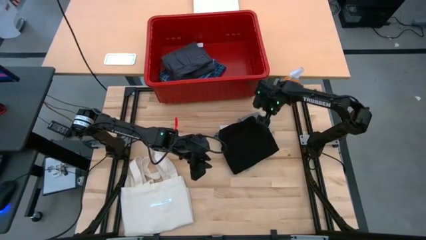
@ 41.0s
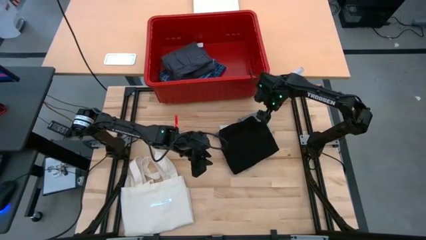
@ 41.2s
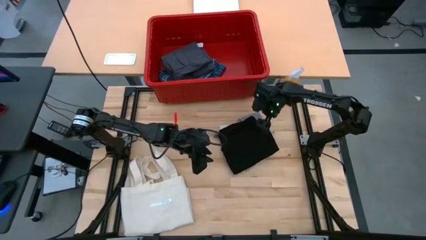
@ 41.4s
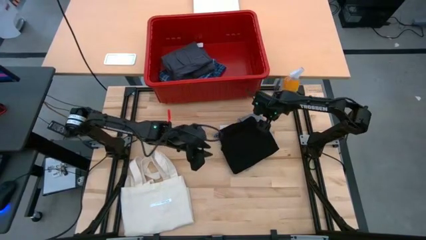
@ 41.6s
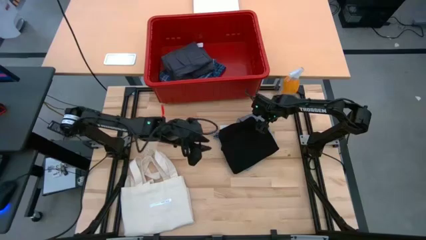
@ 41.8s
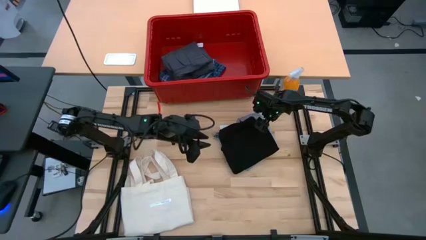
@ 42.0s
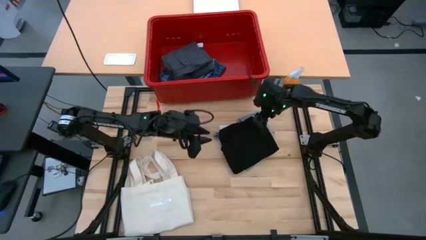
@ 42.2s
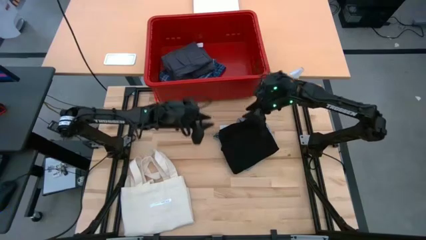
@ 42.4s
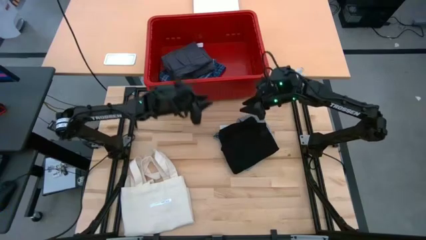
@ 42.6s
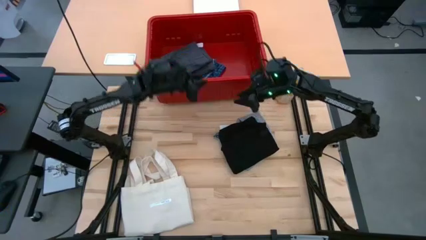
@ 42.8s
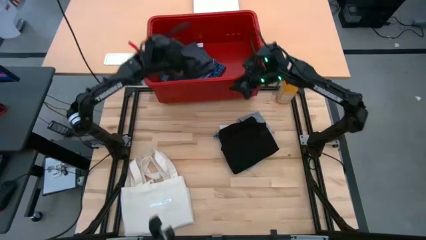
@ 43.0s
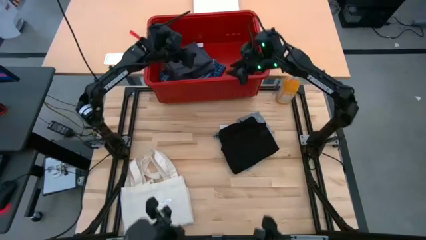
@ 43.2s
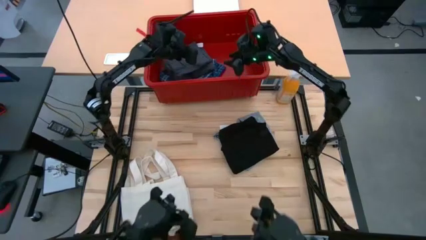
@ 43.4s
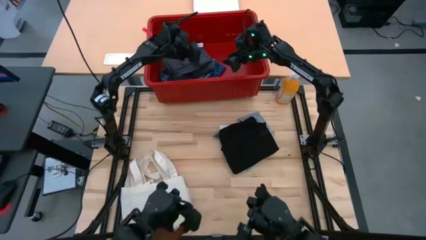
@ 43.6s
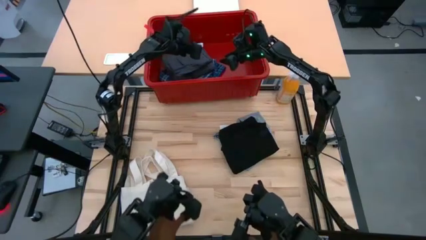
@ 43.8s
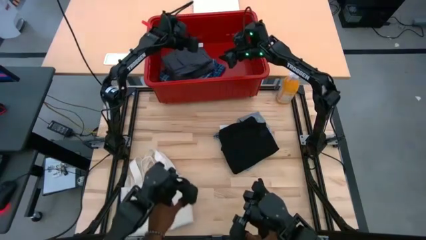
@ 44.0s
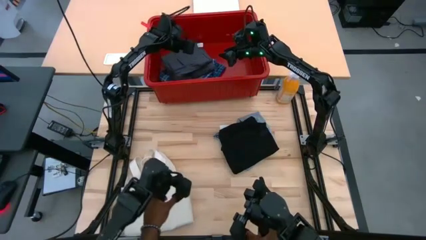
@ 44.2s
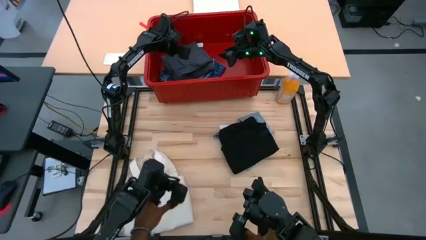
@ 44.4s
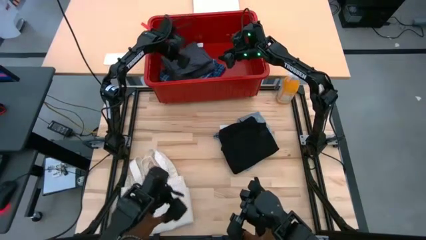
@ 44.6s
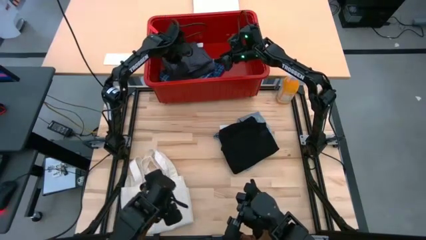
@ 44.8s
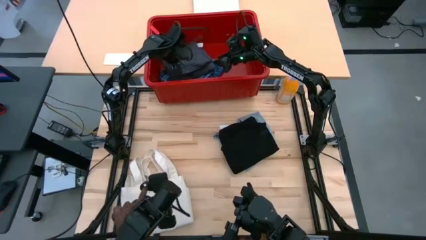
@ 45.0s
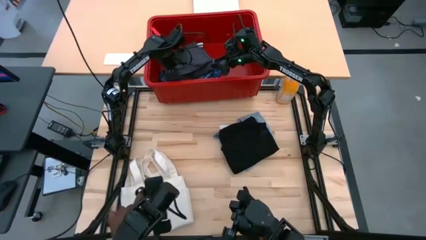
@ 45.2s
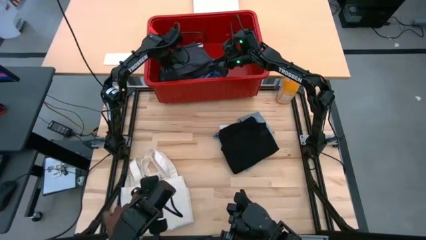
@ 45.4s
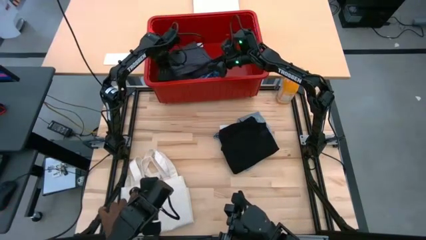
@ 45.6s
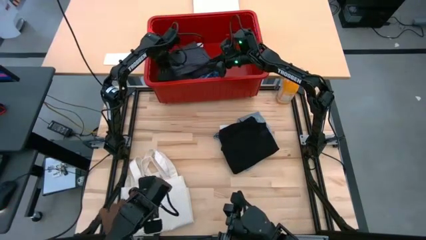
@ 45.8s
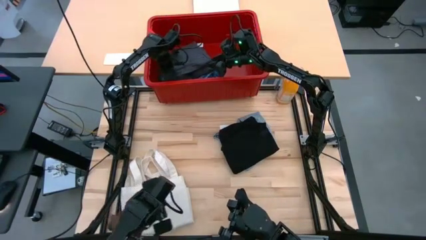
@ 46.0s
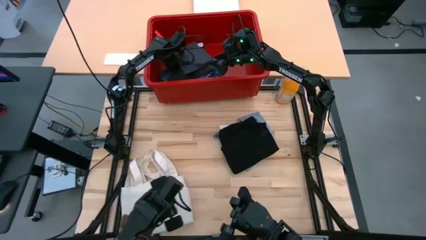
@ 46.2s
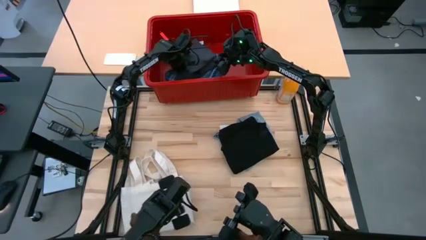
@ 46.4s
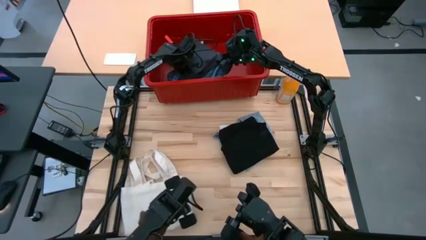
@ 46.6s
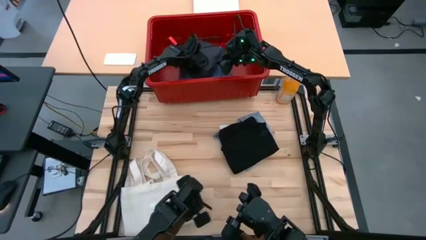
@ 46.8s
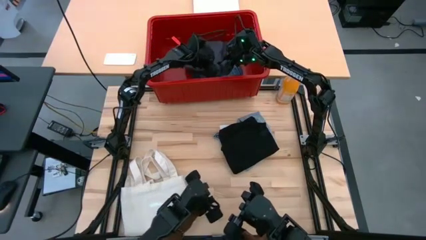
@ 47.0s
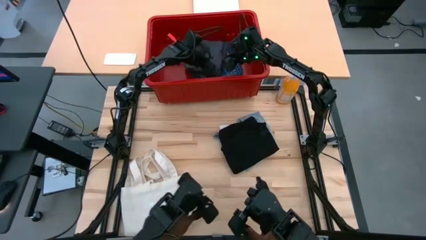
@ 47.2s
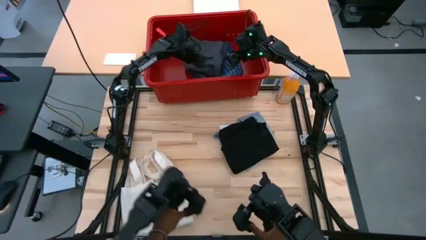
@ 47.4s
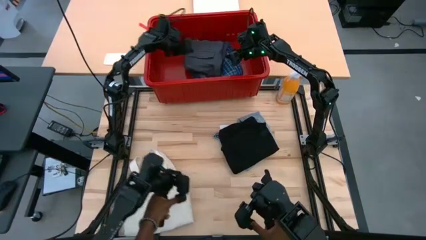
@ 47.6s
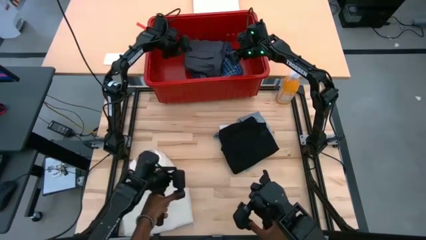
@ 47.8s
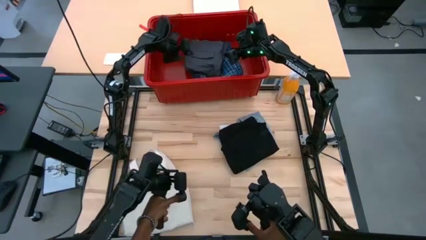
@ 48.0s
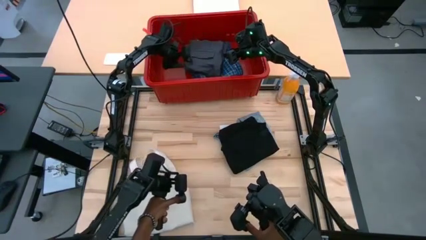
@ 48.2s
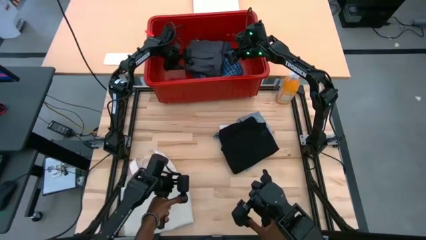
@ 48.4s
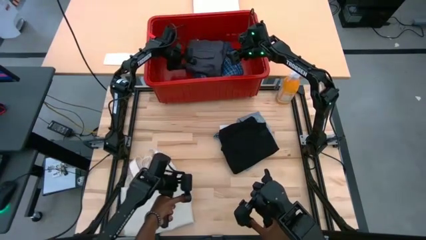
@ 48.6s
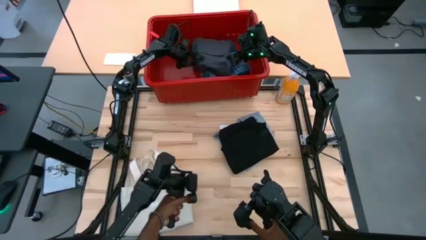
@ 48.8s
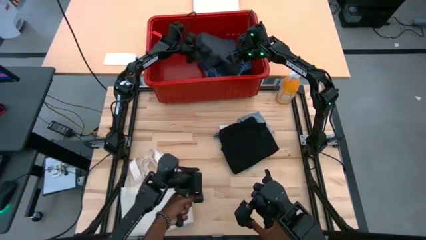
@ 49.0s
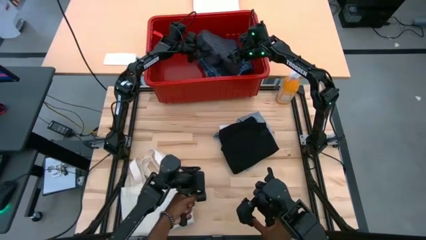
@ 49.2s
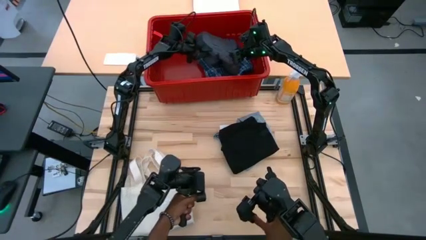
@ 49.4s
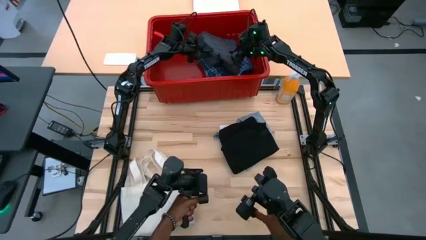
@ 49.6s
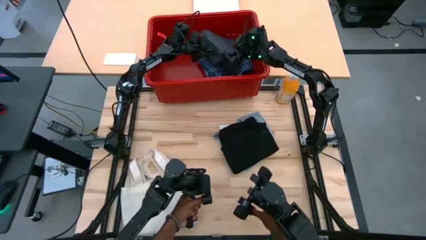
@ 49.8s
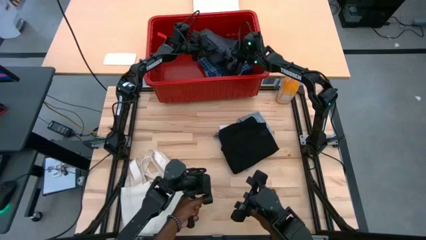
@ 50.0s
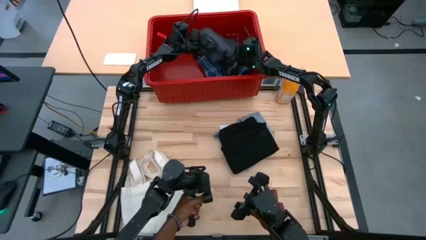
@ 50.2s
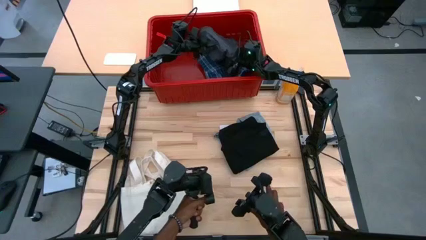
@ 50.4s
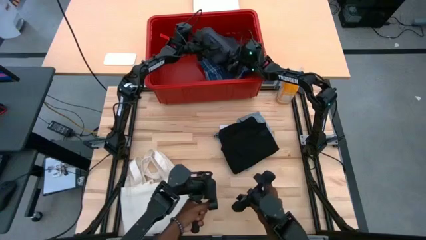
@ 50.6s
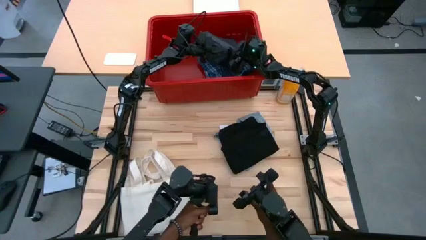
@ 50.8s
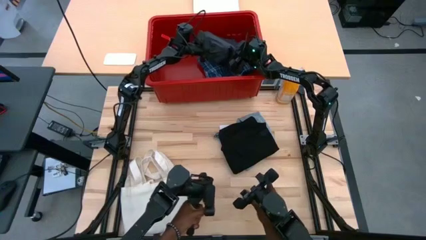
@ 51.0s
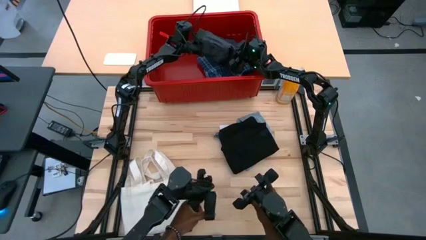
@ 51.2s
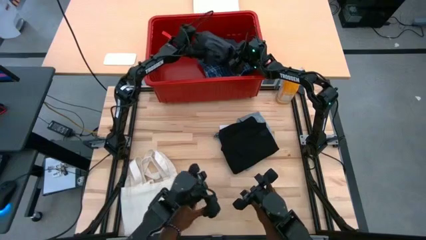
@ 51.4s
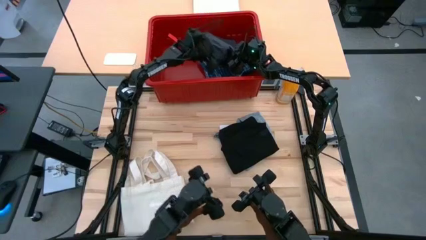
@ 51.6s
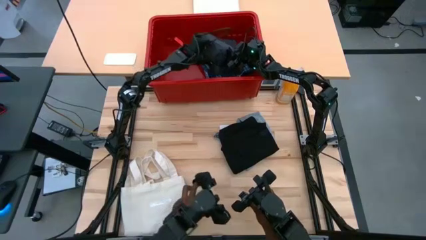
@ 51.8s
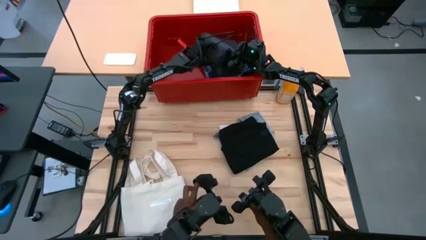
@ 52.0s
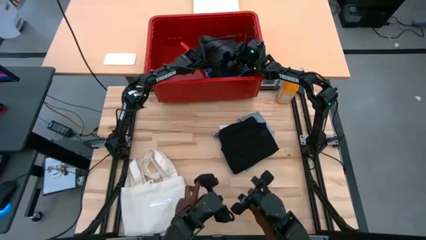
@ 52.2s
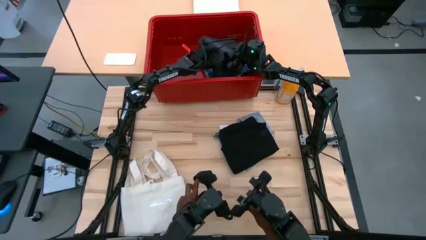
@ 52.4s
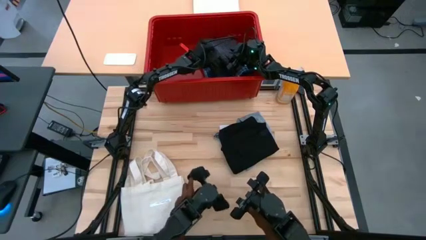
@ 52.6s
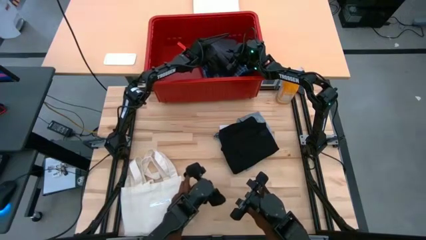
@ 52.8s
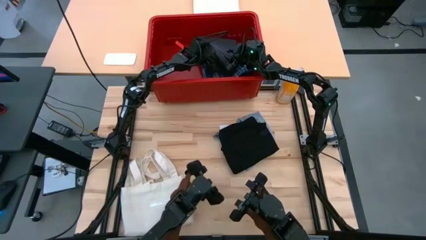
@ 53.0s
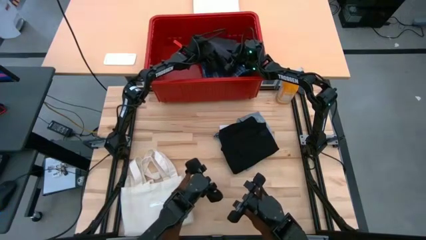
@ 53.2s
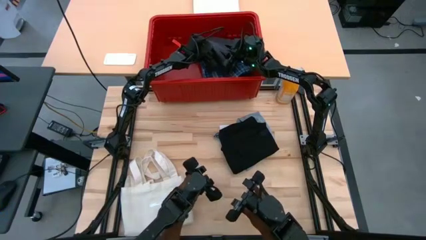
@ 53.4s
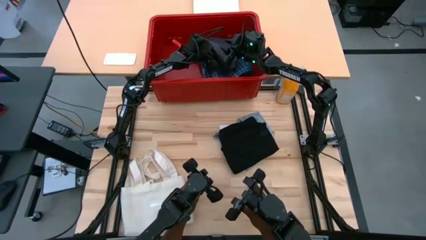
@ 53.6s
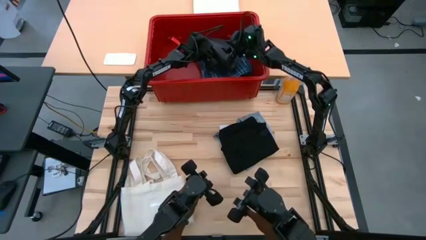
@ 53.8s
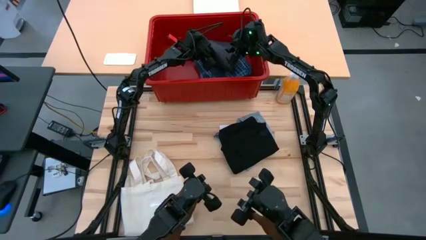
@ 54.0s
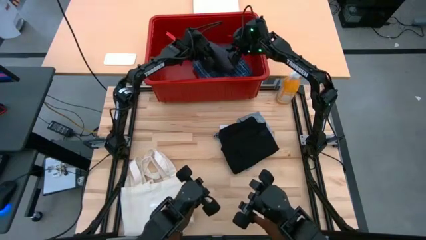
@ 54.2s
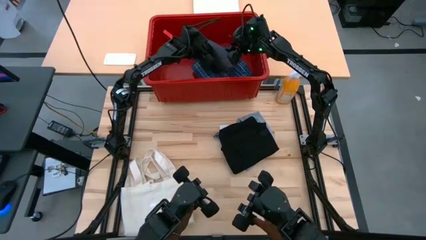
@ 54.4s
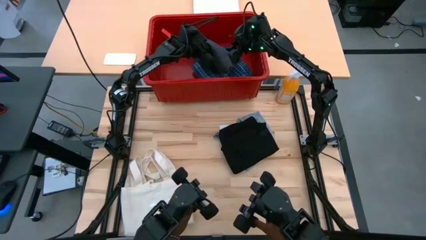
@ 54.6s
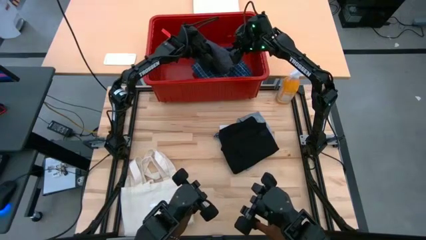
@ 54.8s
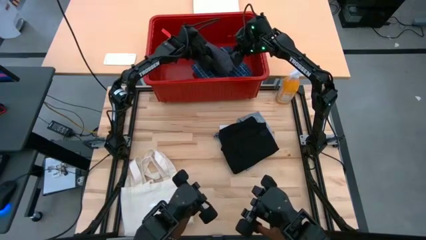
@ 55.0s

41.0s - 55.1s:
Task: Fold laundry
Remove the gray pants from the red organizer bin
